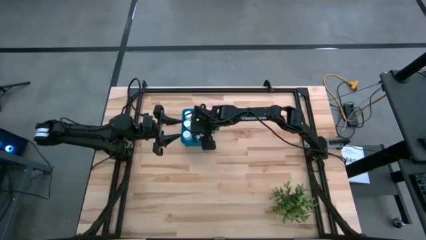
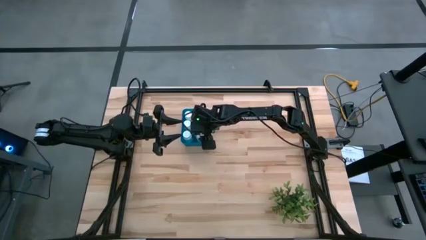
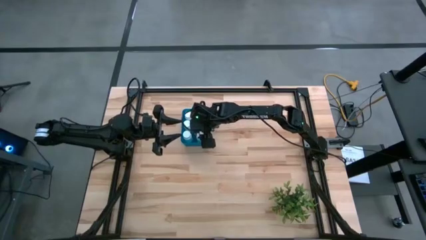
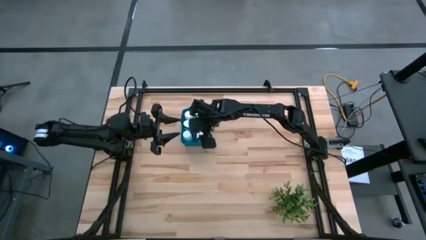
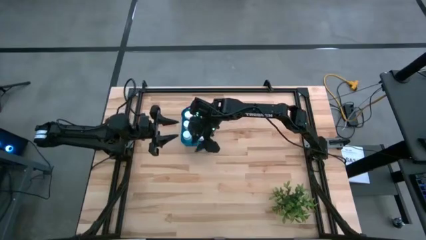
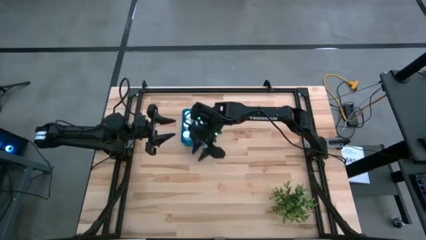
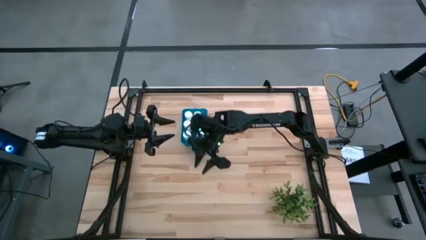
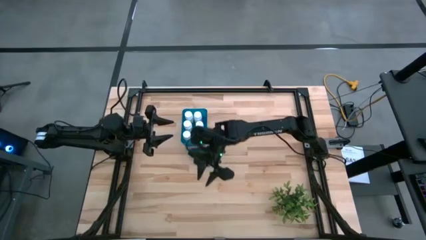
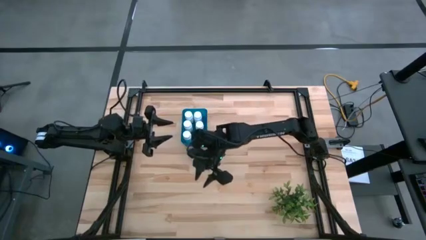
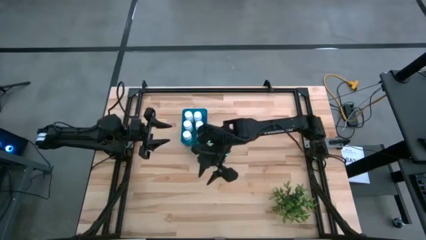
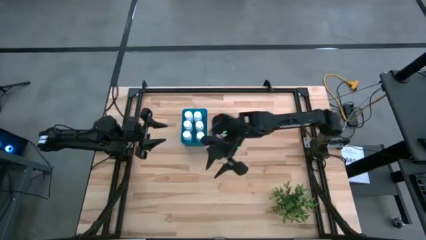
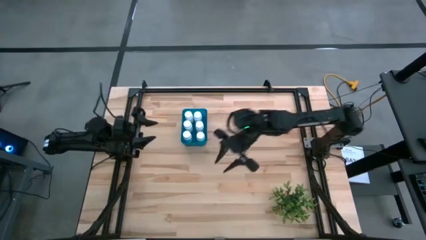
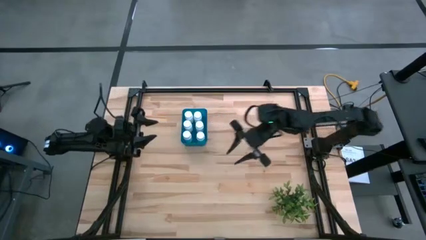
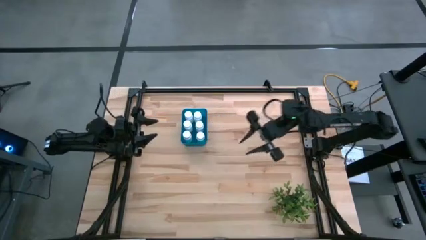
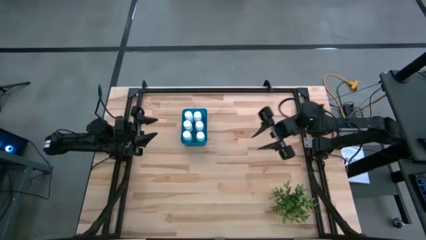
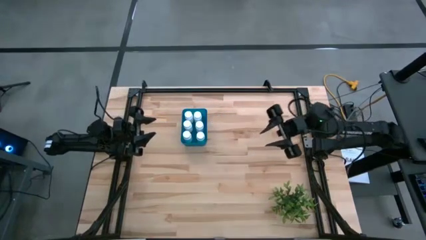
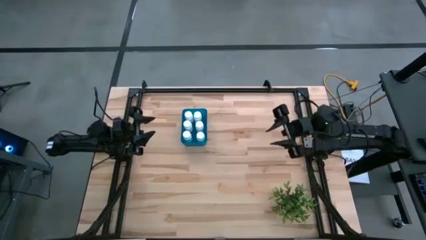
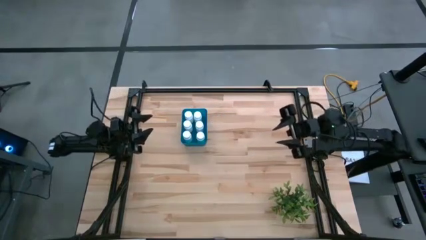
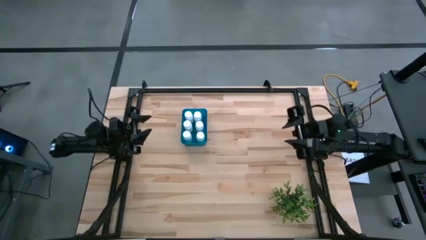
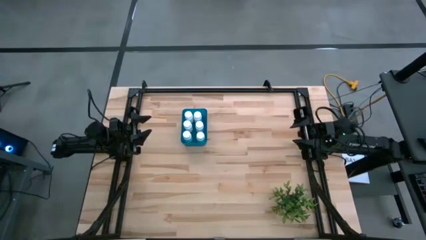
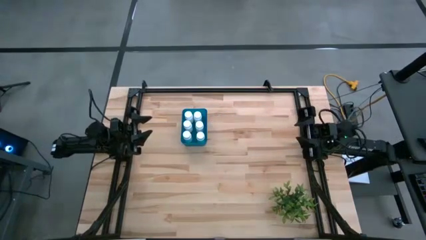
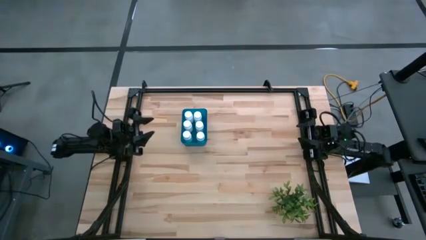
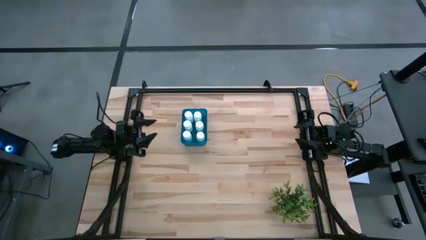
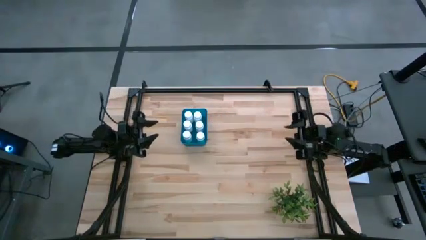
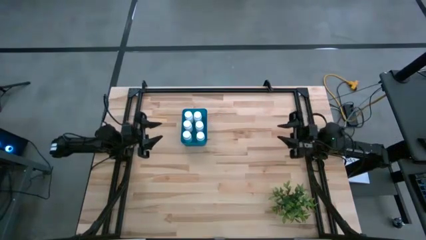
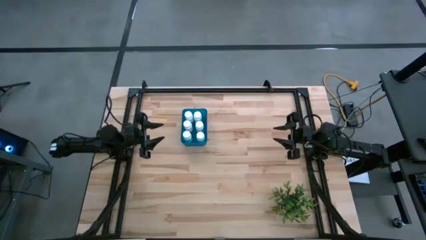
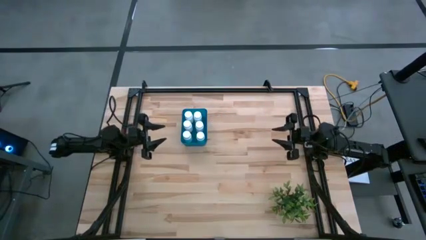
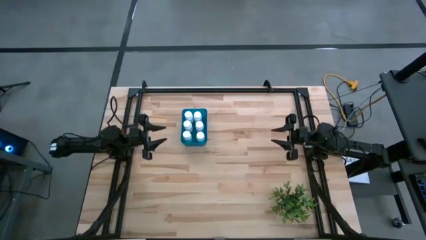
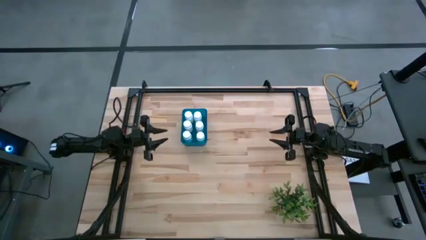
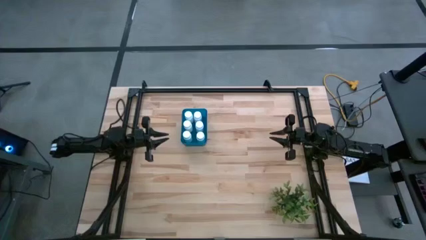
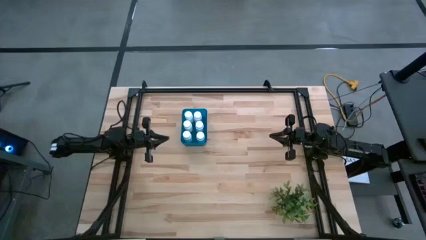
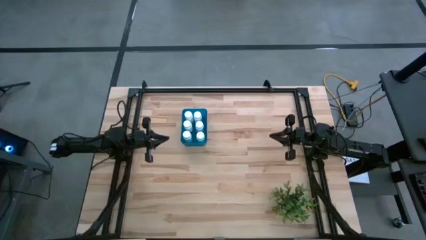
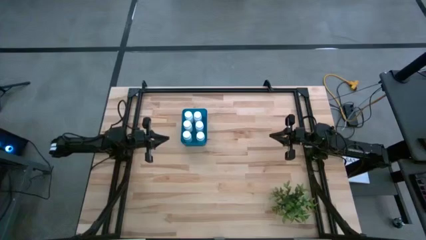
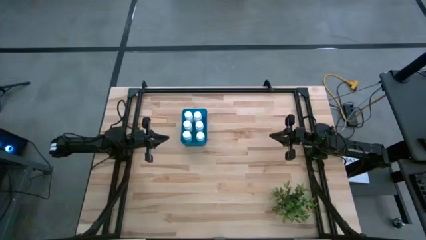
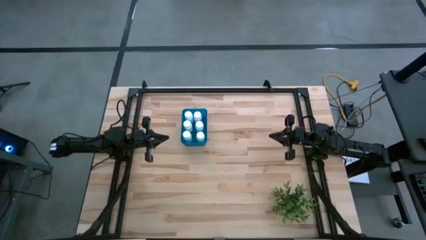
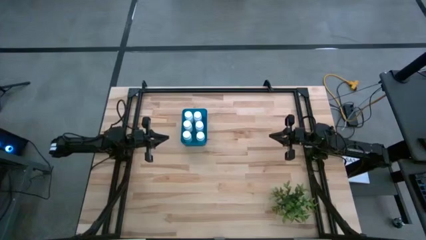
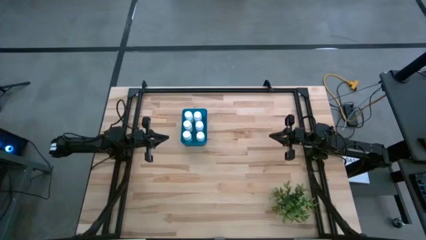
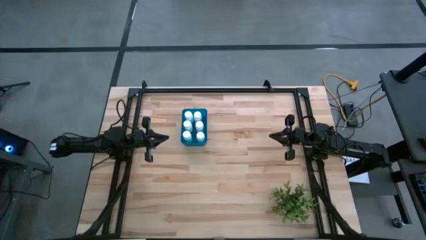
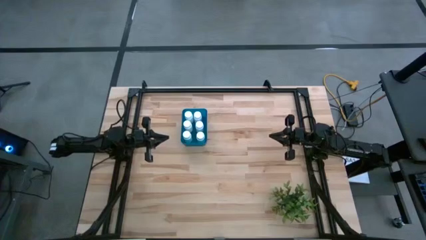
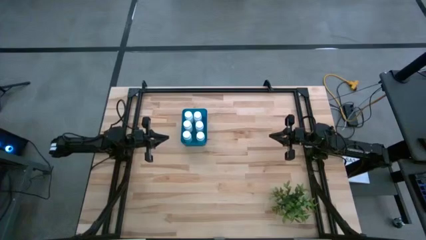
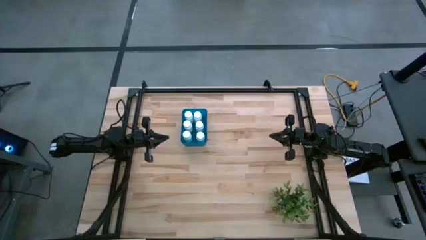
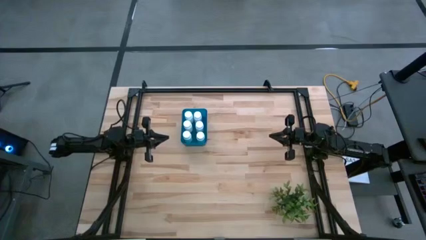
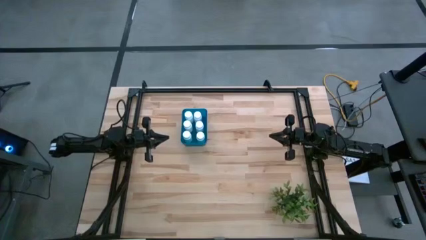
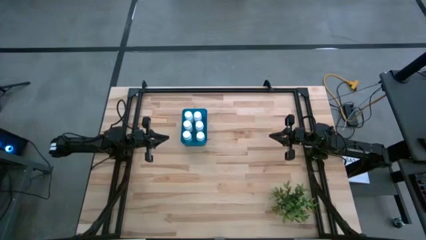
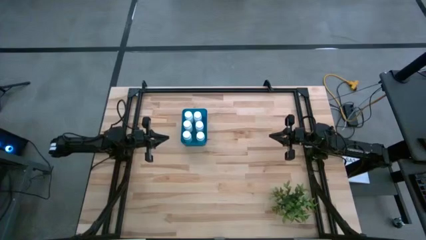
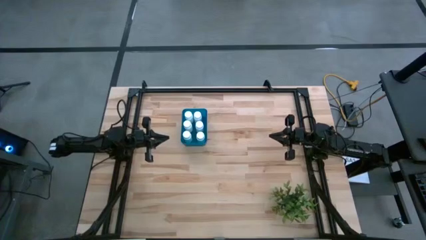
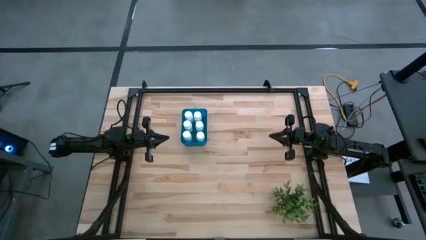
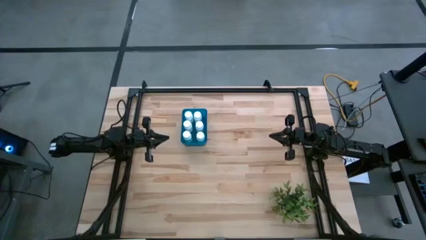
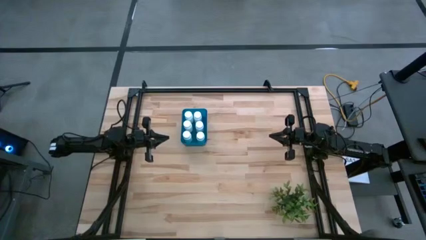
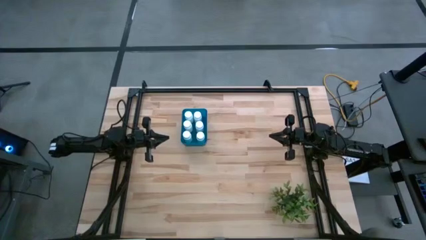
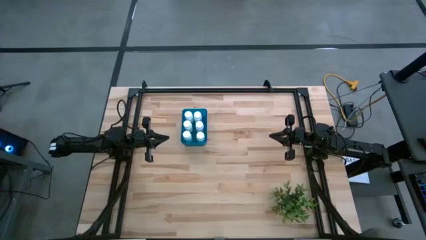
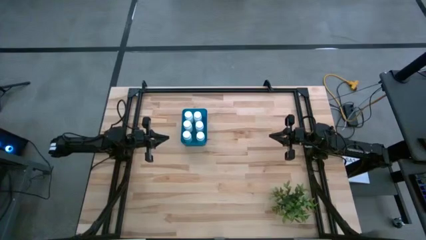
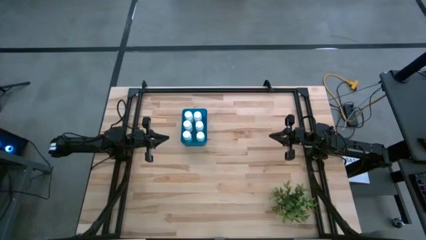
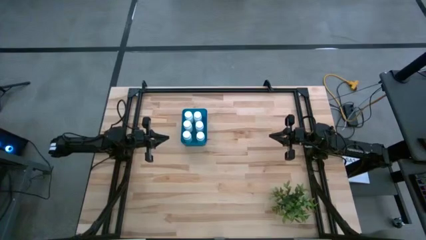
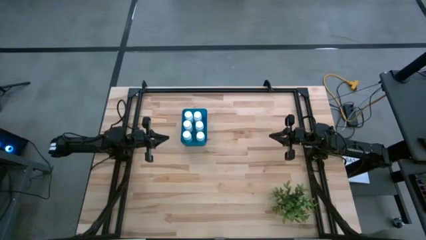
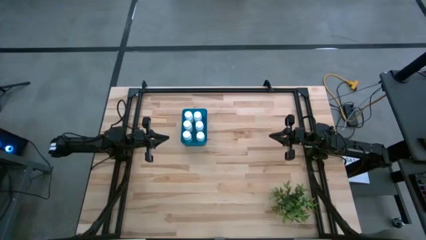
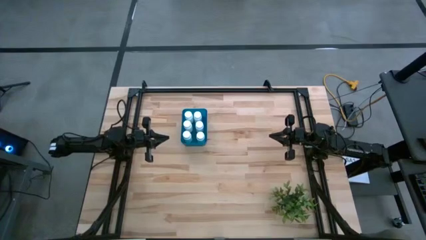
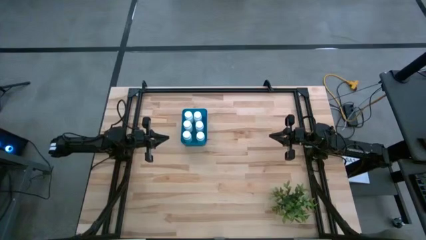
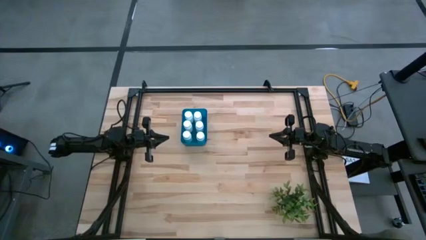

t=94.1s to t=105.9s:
Task: Pick and place pill bottles into a basket
Return to Home Position

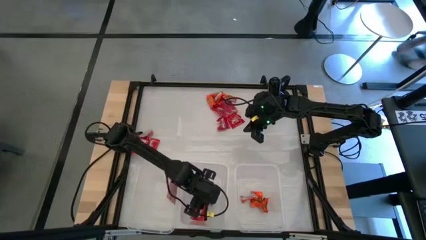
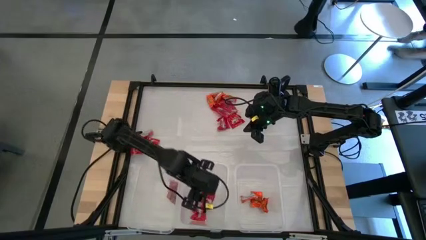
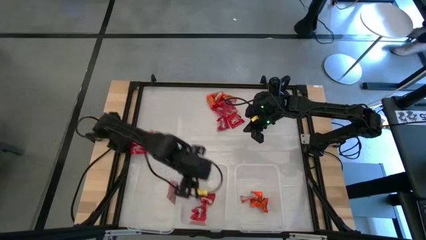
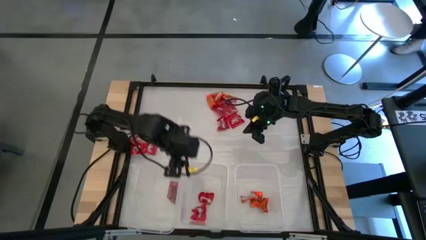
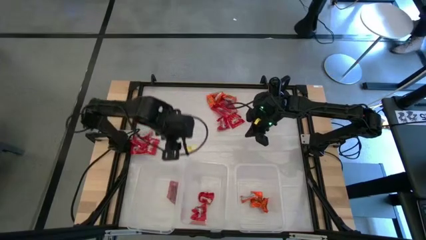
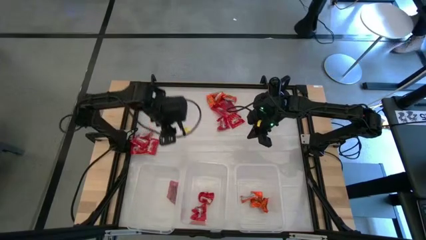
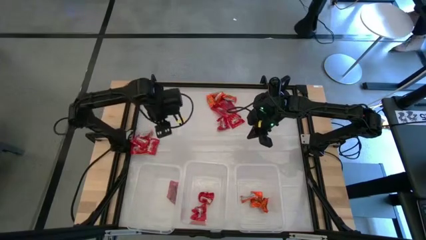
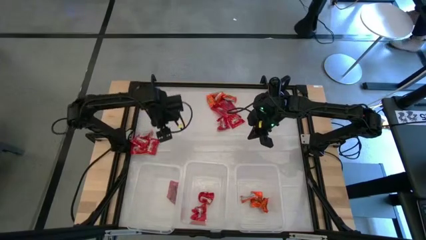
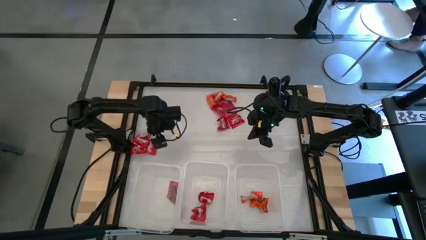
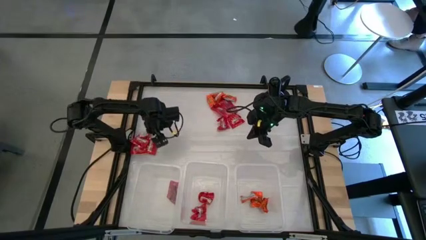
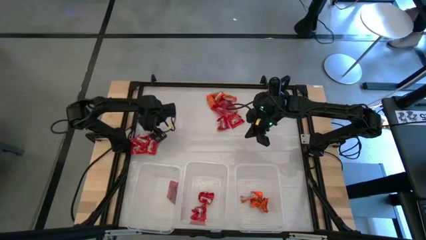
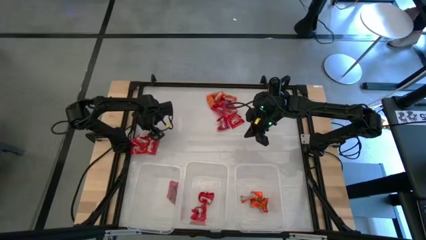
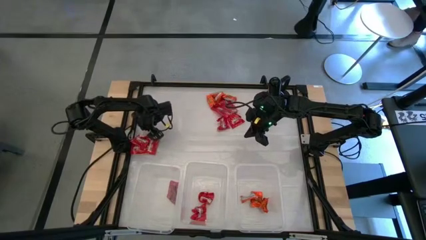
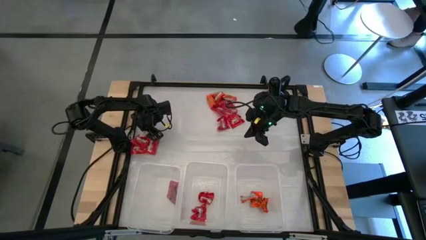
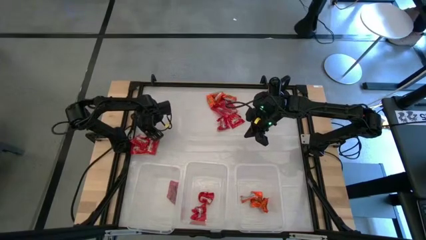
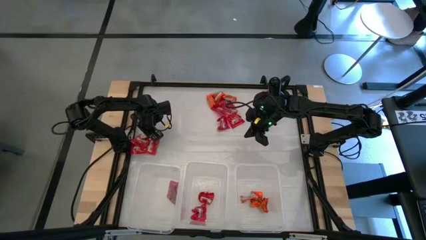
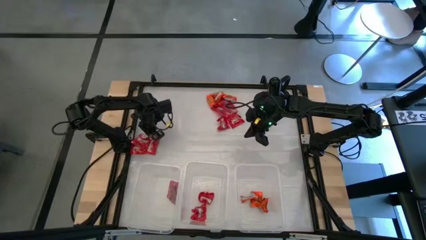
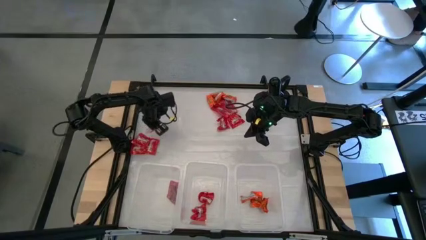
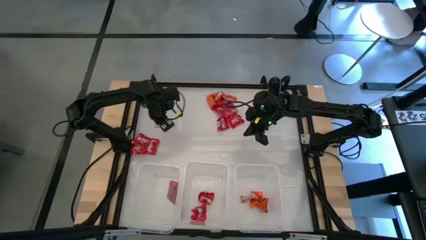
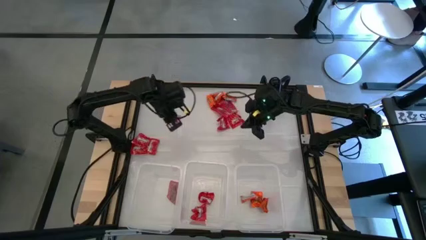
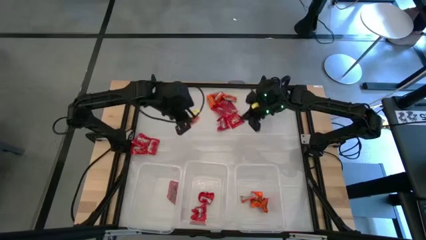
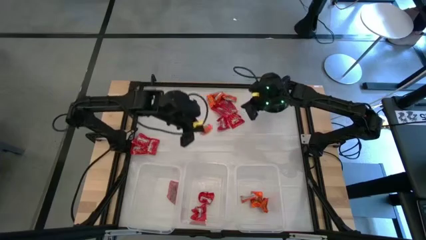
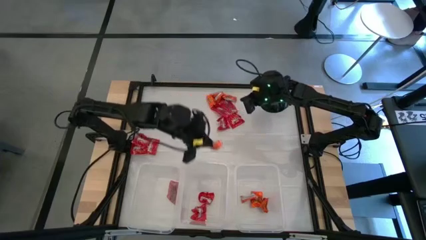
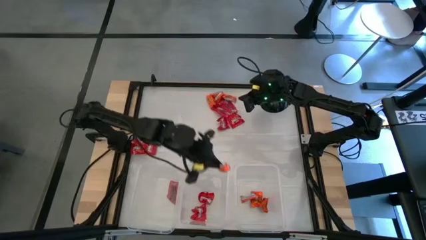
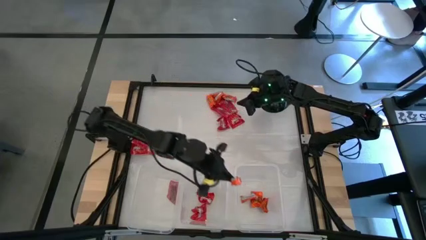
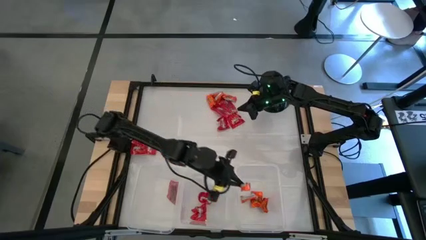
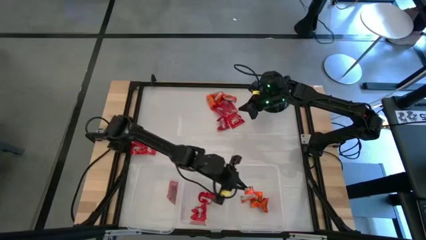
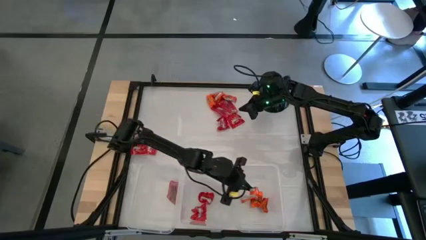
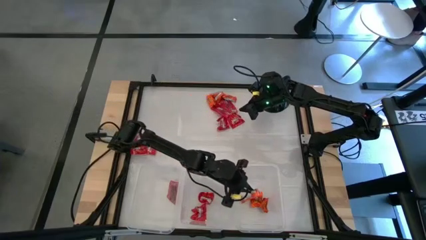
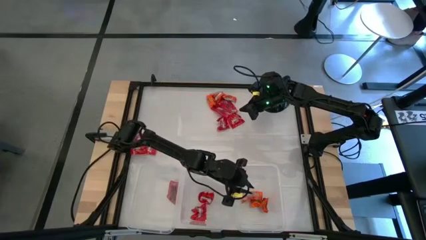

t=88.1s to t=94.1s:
Task: Sort candy
Put the orange candy into the right transparent bin
